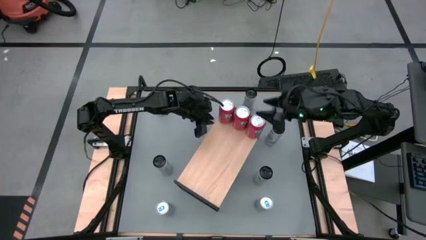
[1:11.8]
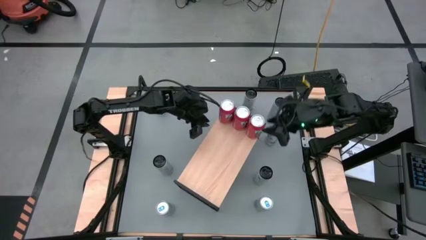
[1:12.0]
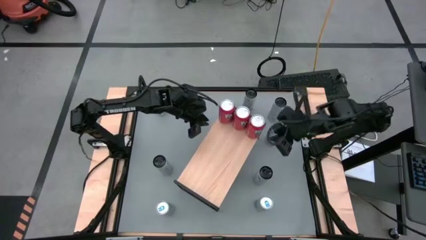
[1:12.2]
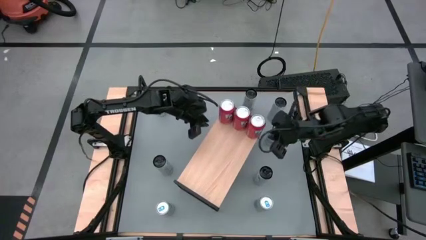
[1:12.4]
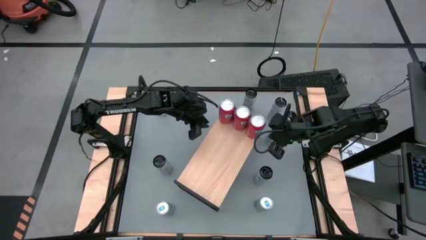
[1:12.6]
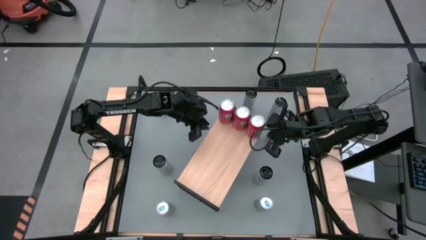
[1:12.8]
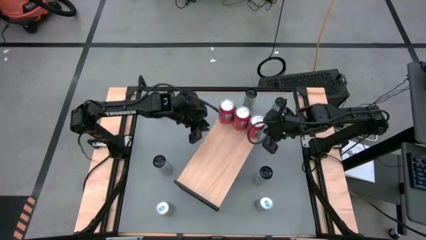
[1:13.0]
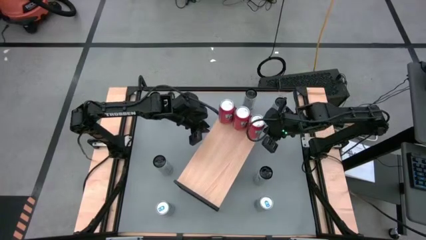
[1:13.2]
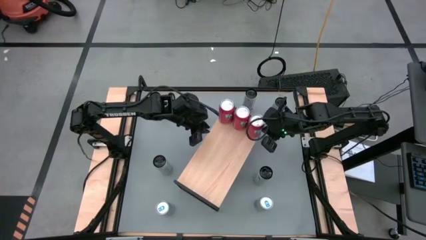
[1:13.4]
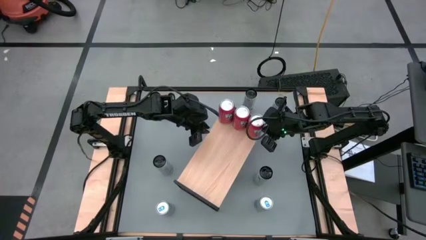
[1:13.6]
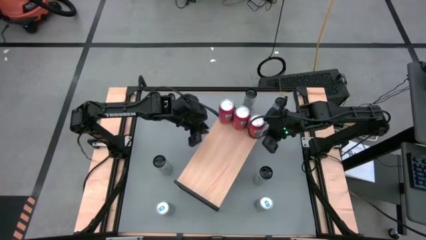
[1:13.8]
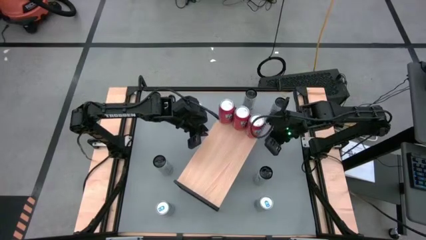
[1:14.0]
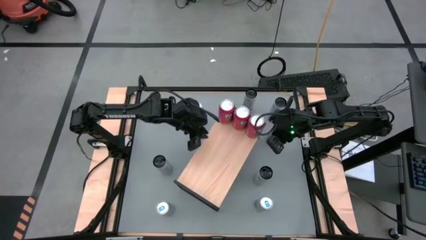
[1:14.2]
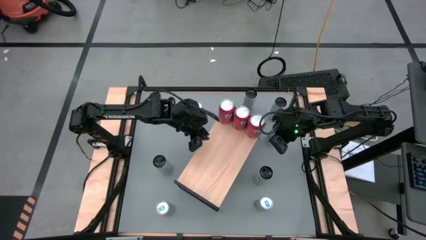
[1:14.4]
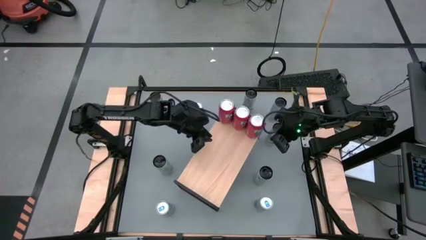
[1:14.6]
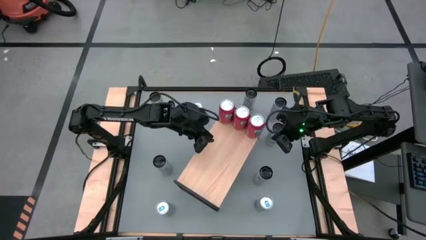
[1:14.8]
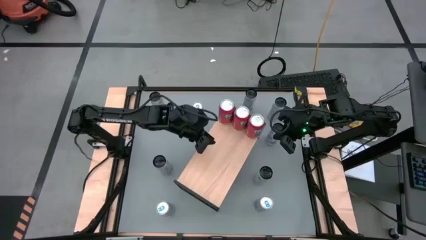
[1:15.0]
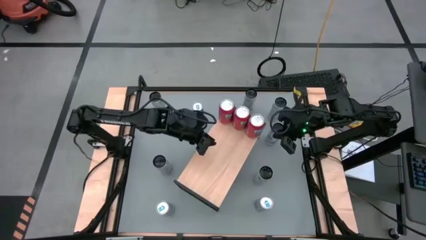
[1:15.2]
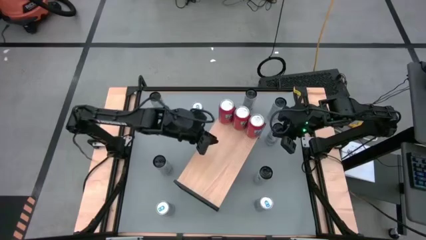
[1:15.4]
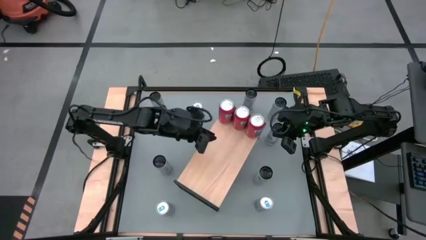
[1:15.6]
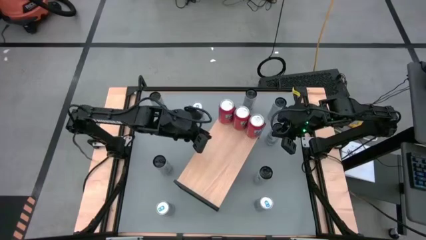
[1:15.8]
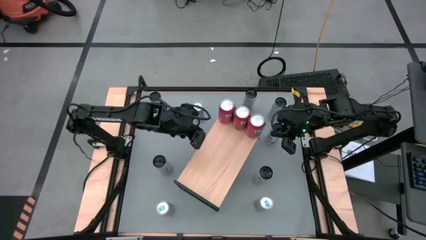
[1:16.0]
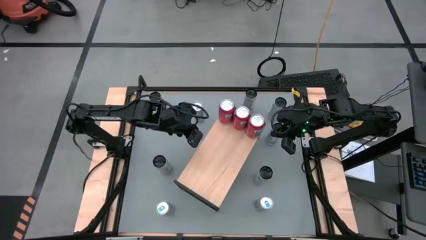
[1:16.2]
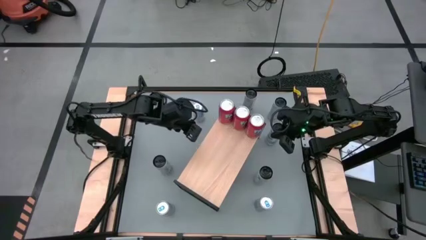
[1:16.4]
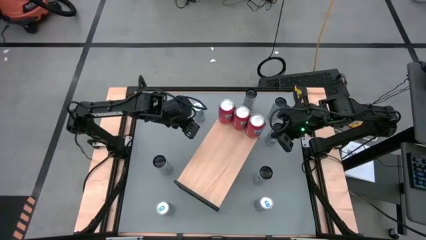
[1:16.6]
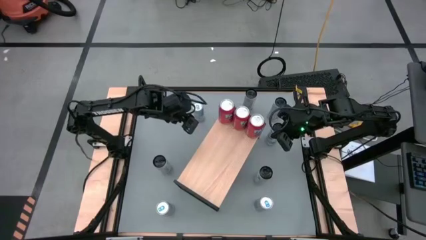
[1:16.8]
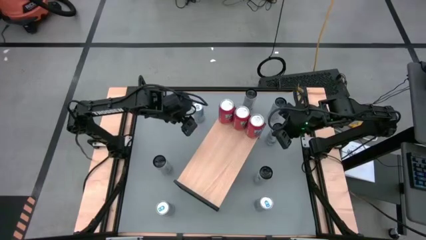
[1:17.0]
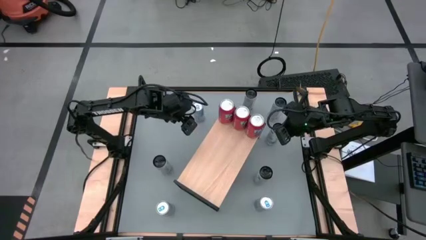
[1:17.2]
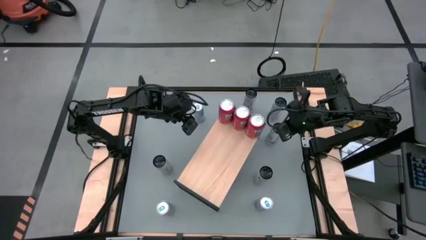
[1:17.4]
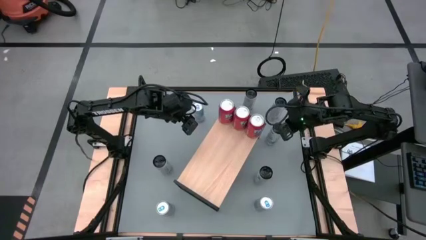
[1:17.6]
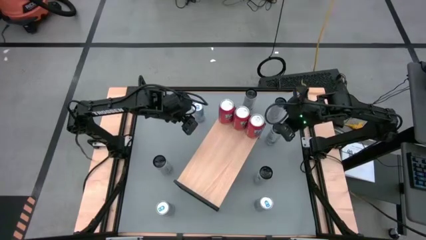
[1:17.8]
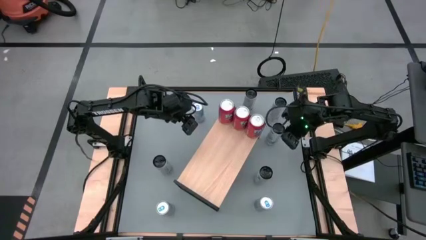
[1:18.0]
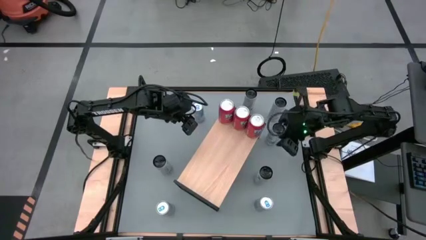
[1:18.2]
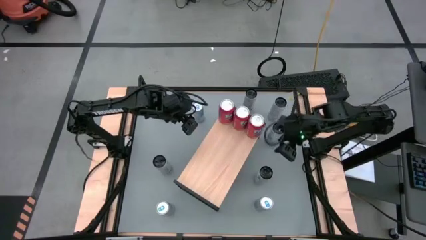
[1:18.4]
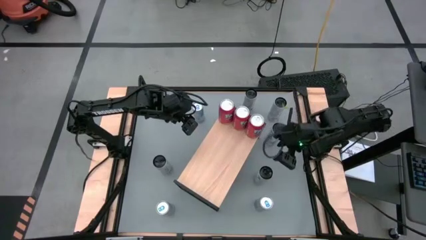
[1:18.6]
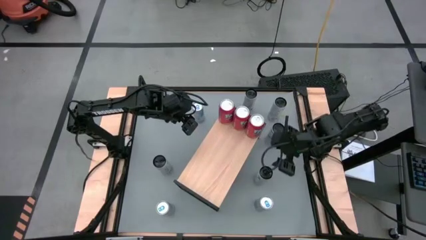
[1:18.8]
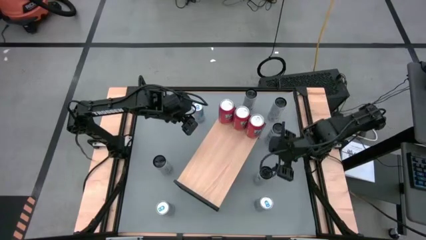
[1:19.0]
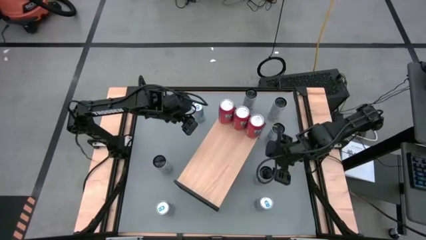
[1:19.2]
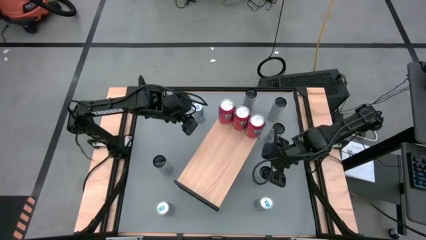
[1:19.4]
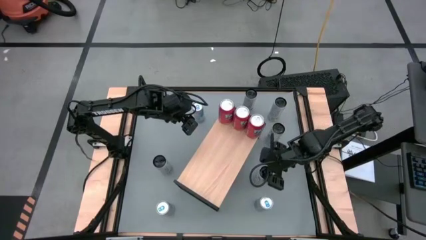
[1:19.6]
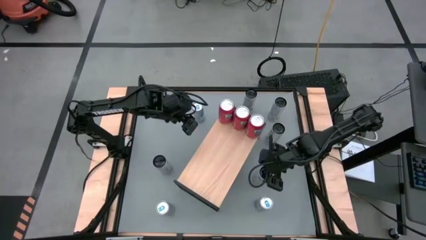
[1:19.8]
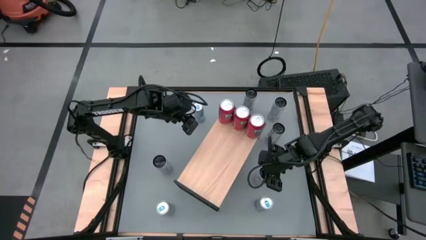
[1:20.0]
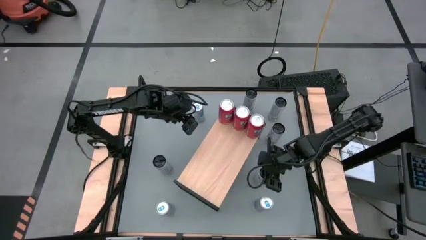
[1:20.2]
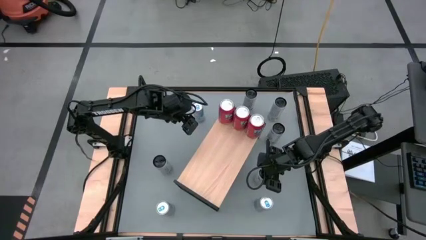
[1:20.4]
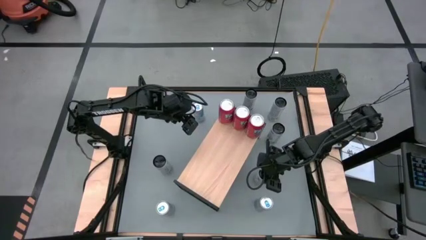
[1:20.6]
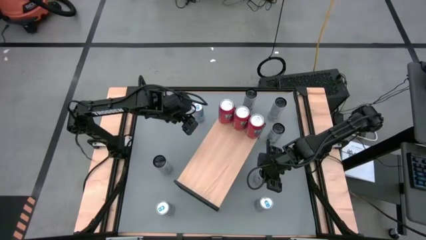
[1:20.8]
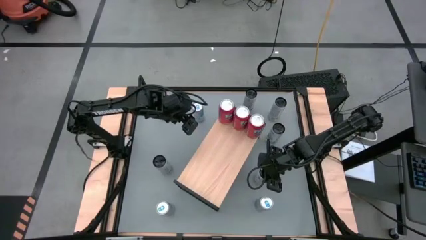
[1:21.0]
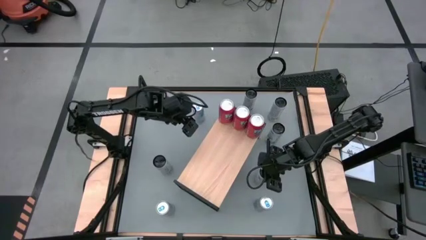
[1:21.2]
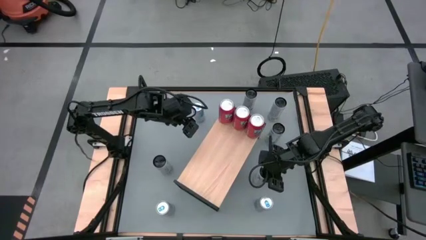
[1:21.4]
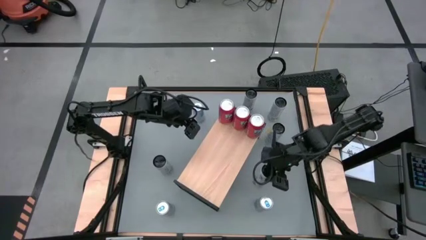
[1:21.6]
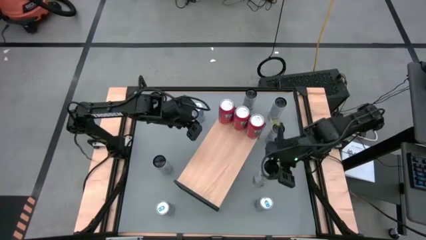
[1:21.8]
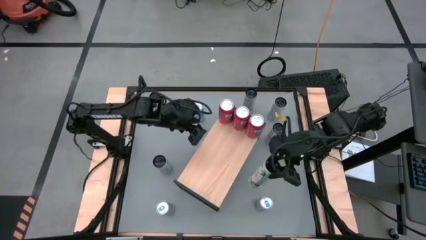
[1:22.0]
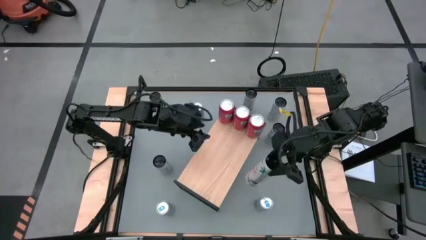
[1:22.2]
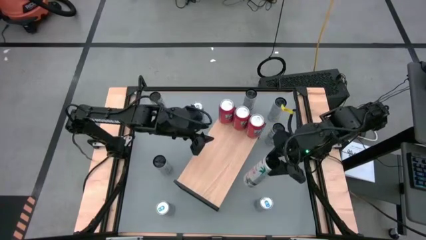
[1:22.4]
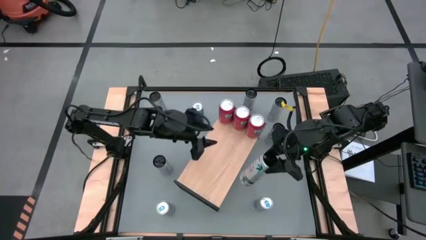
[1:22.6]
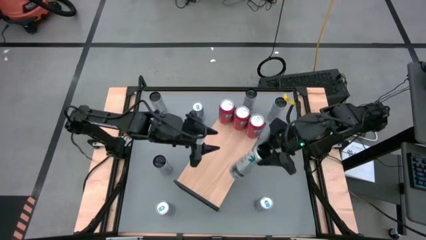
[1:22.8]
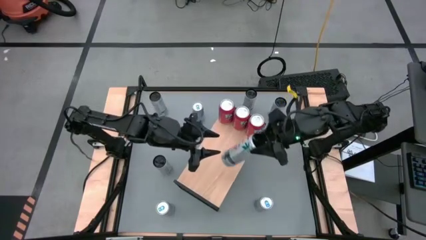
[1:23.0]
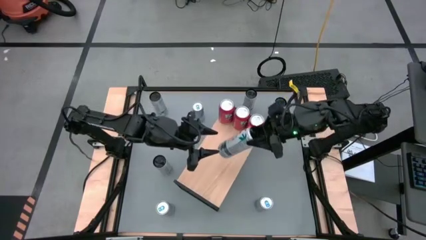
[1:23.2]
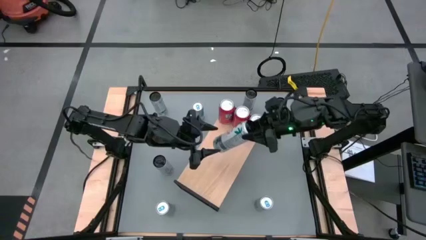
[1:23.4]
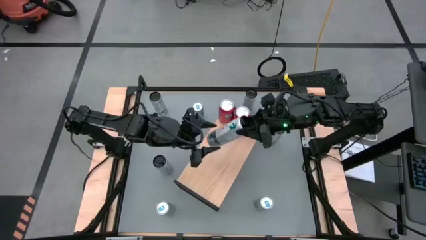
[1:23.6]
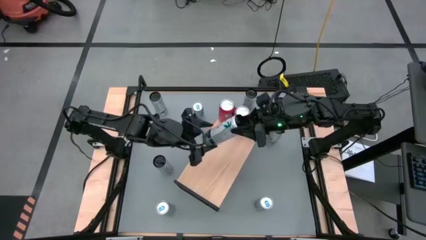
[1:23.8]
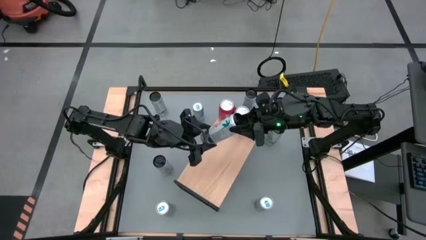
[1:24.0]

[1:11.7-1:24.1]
Task: Place canned beverage on shelf
Put the white pink soda can on the shelf

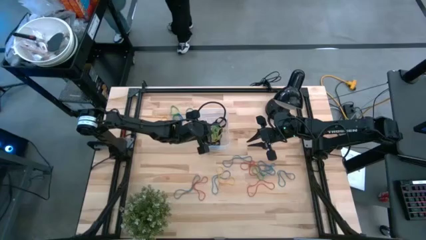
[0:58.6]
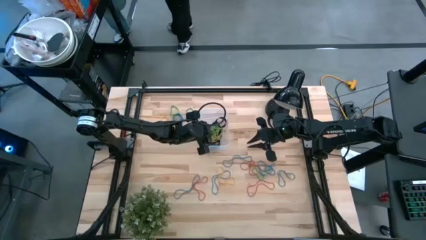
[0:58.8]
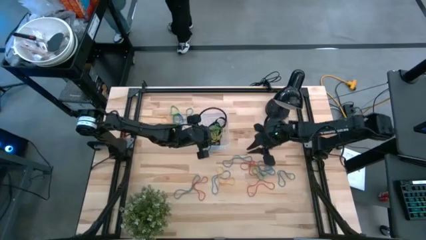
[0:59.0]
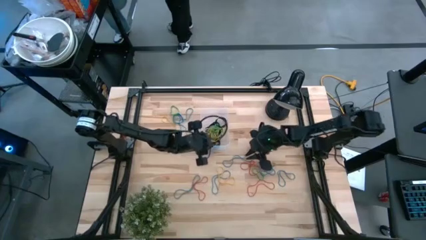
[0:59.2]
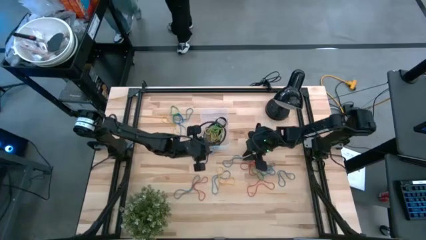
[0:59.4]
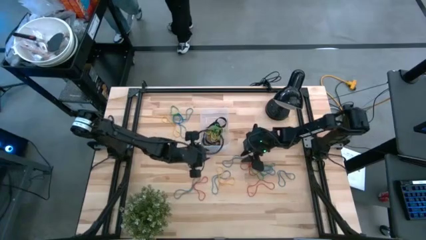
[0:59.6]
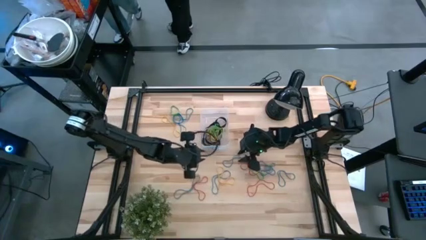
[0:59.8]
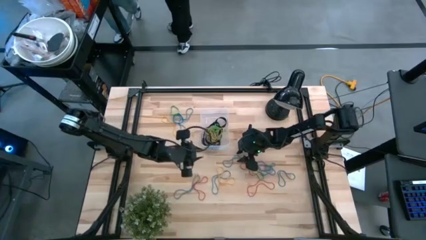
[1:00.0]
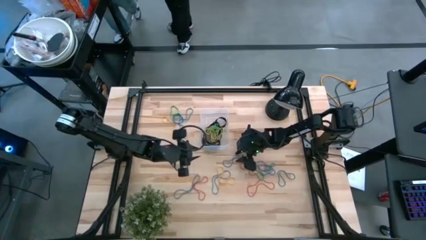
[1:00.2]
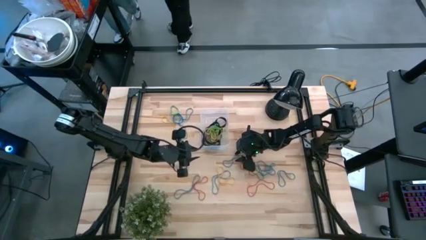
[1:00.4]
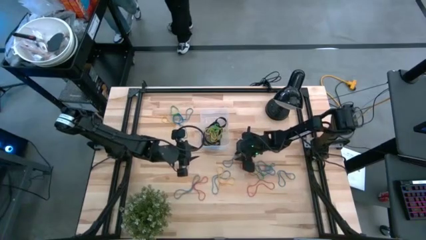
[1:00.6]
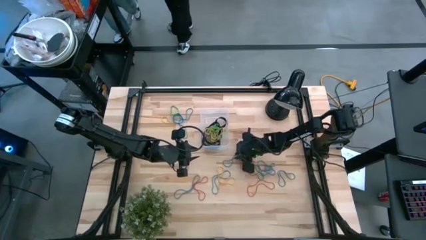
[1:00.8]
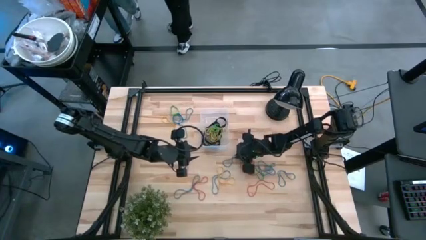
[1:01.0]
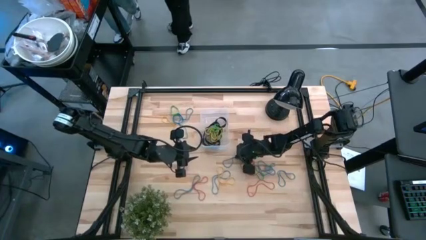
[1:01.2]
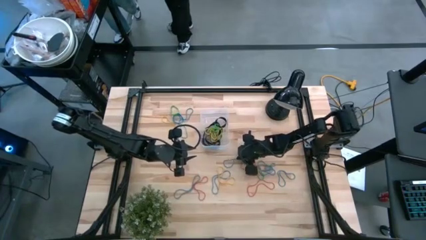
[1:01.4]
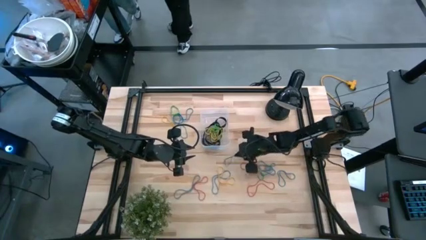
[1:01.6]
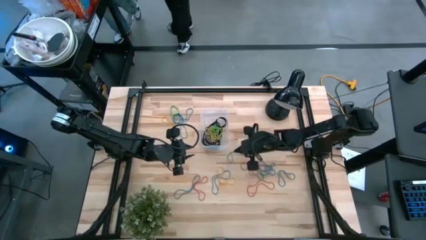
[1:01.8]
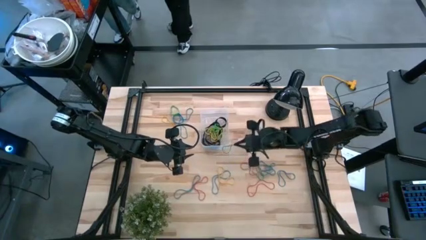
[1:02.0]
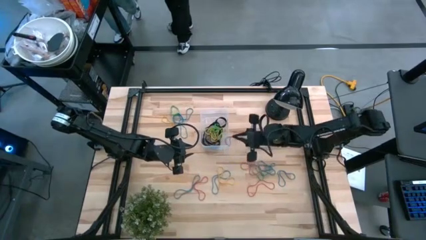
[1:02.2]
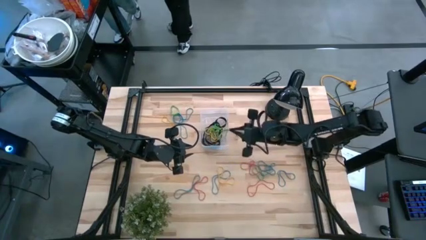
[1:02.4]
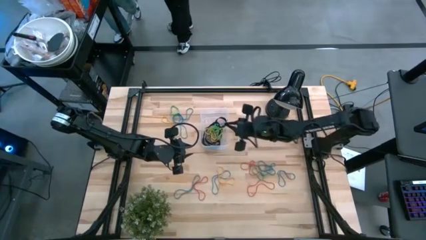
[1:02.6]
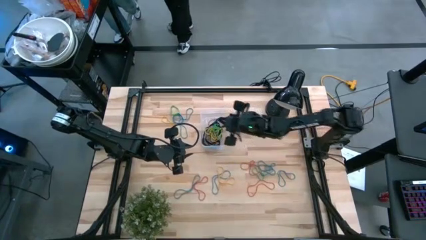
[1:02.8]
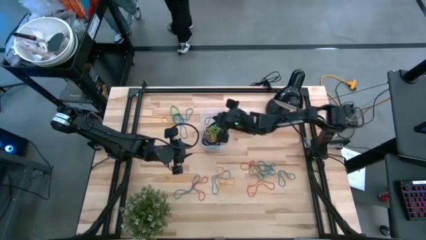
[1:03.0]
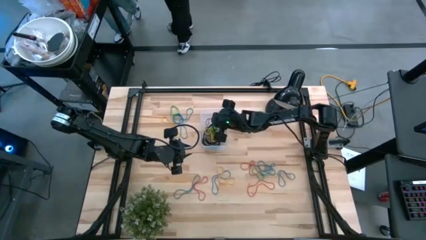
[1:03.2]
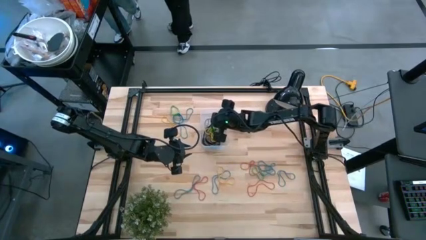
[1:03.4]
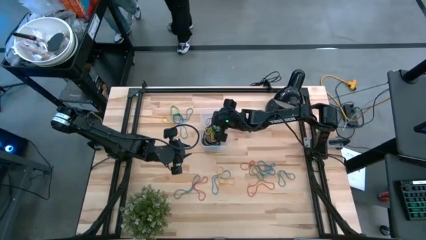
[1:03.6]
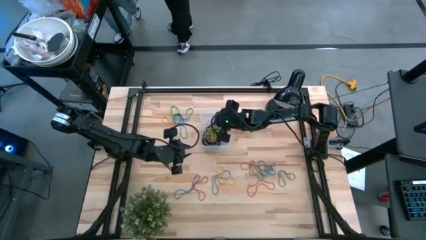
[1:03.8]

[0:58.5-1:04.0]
Task: Pick and place rubber bands into bin
Put the blue rubber band into the transparent bin
